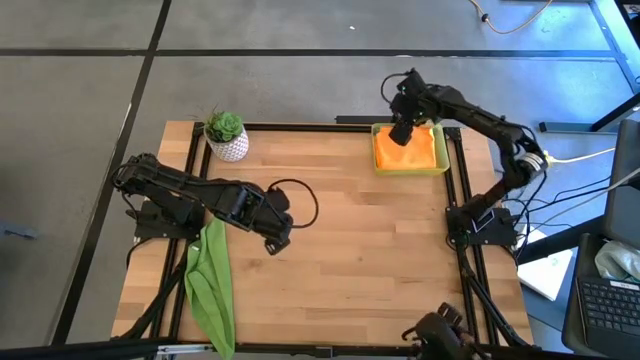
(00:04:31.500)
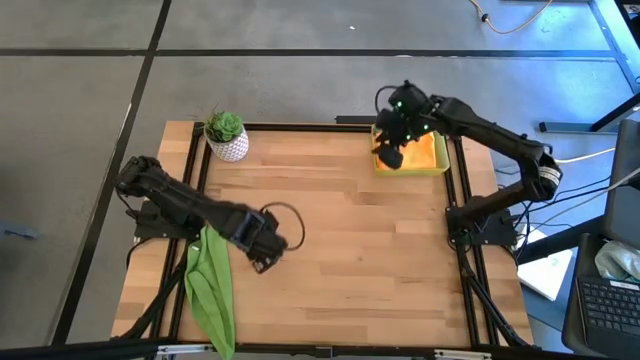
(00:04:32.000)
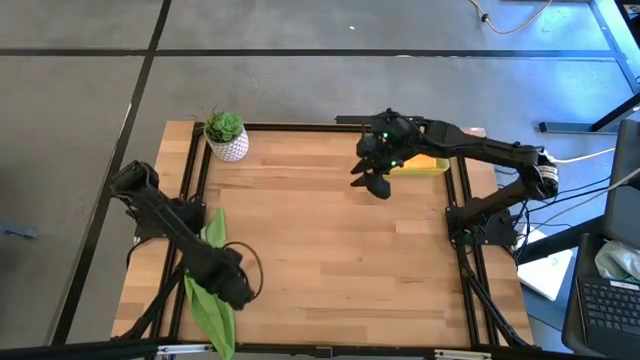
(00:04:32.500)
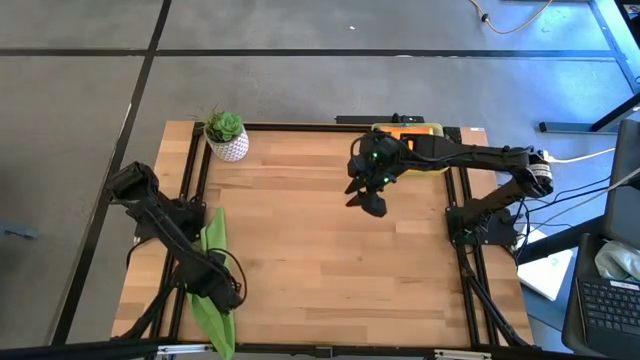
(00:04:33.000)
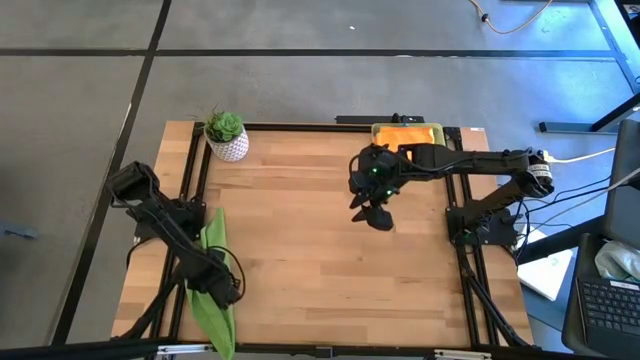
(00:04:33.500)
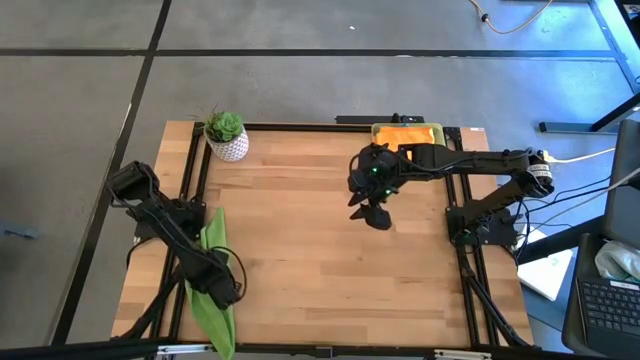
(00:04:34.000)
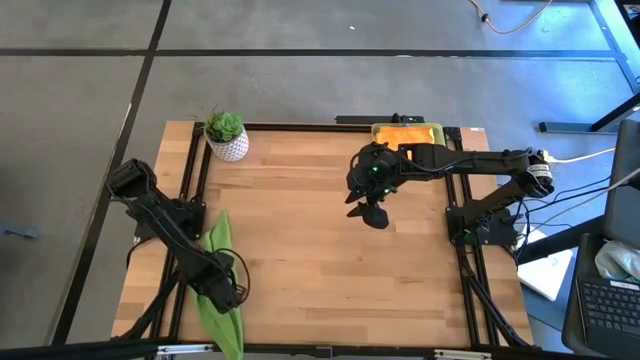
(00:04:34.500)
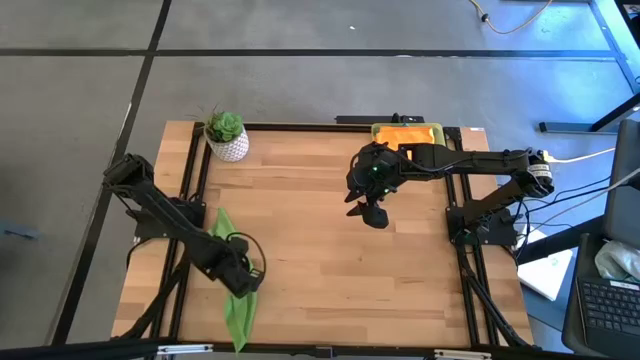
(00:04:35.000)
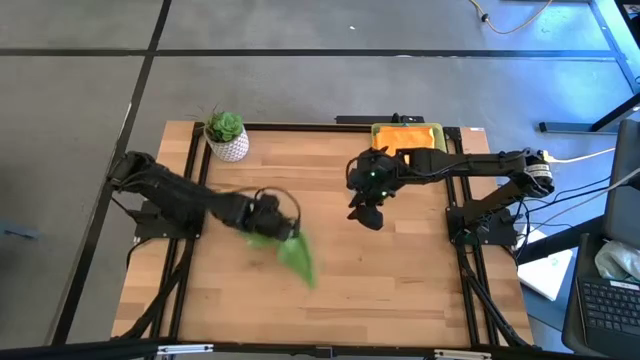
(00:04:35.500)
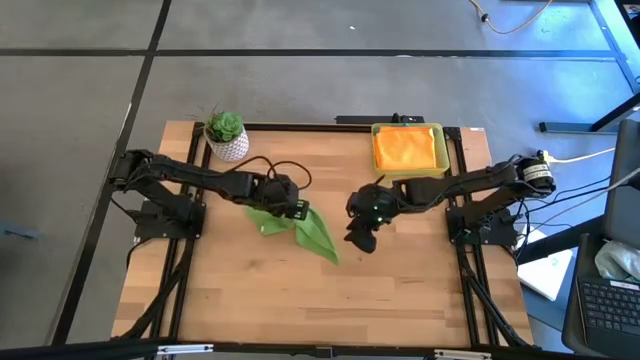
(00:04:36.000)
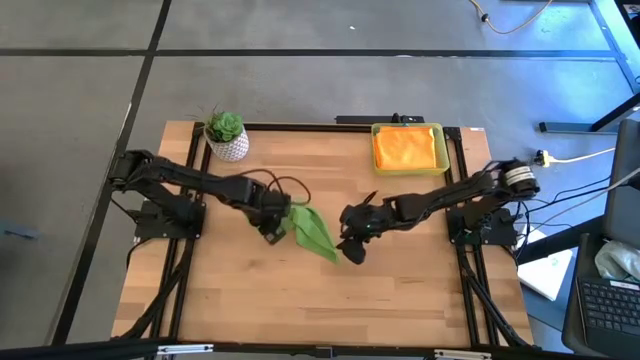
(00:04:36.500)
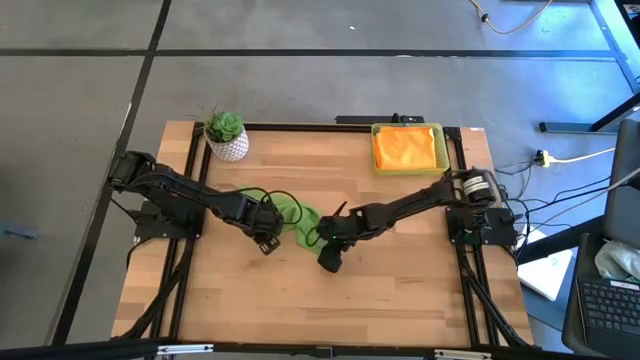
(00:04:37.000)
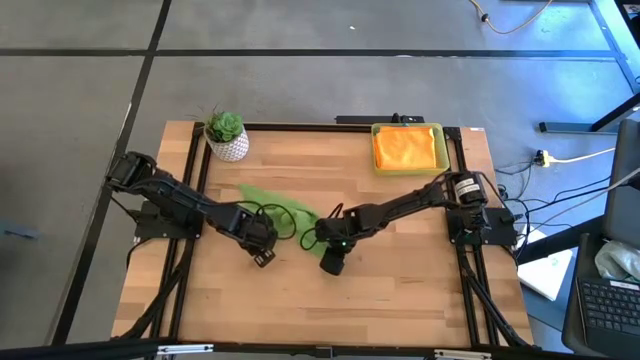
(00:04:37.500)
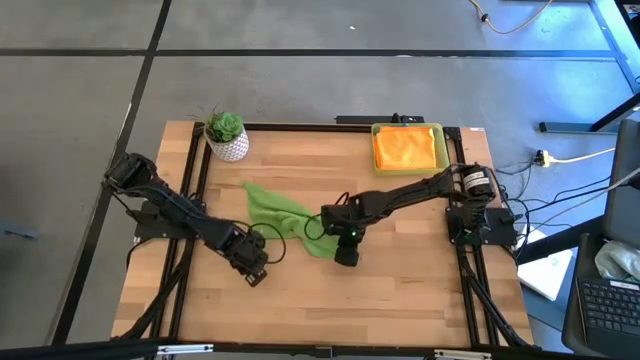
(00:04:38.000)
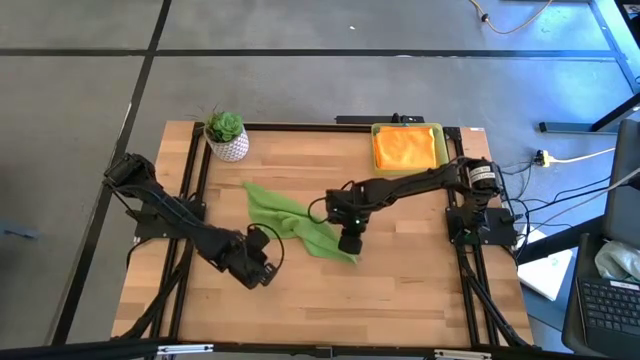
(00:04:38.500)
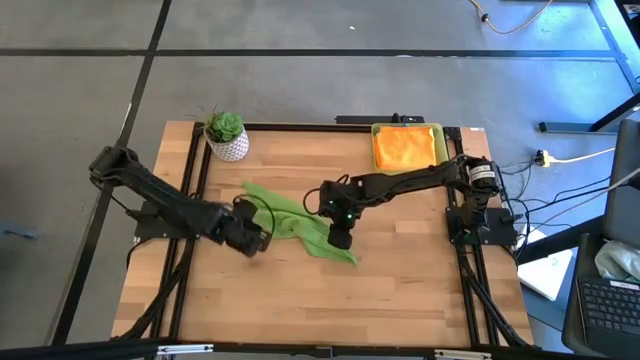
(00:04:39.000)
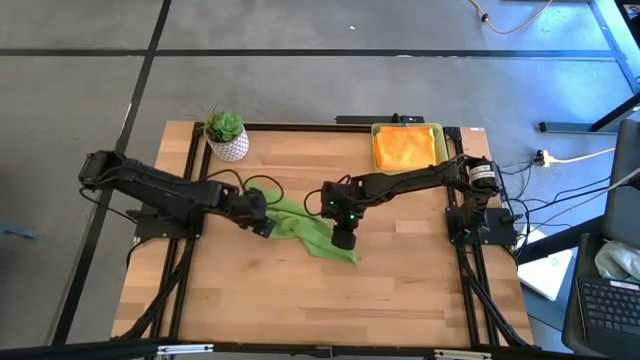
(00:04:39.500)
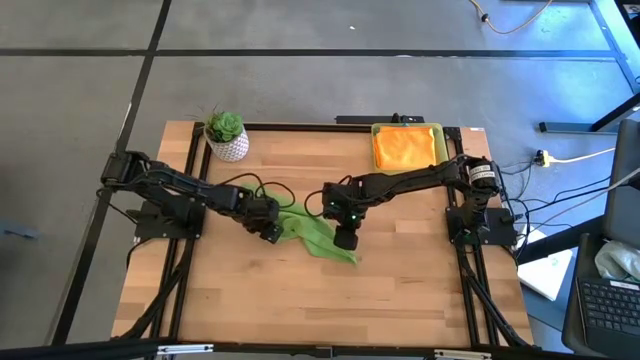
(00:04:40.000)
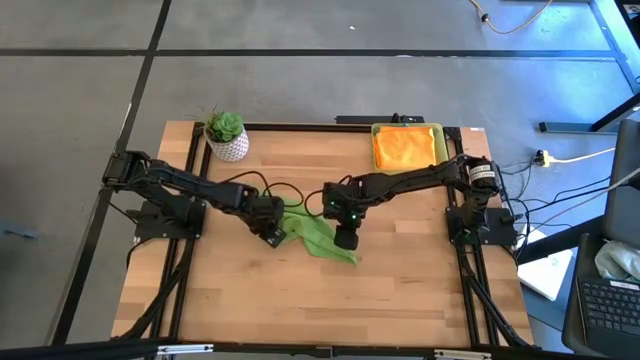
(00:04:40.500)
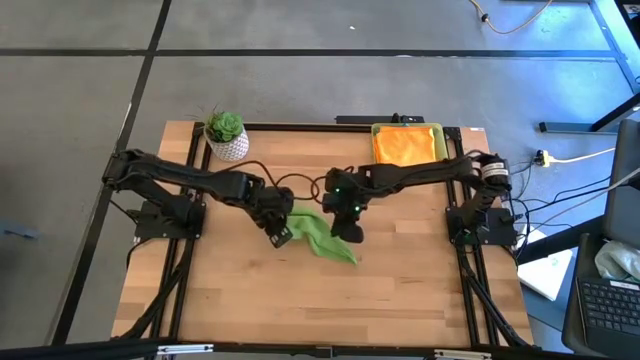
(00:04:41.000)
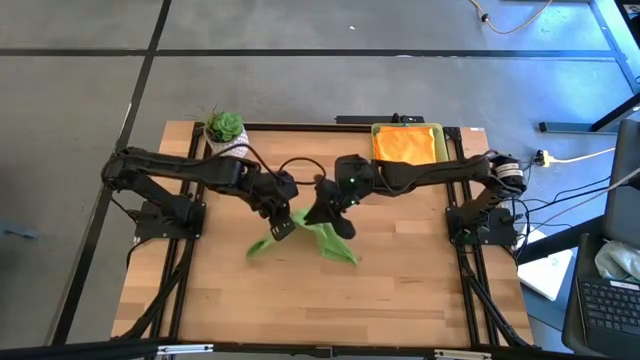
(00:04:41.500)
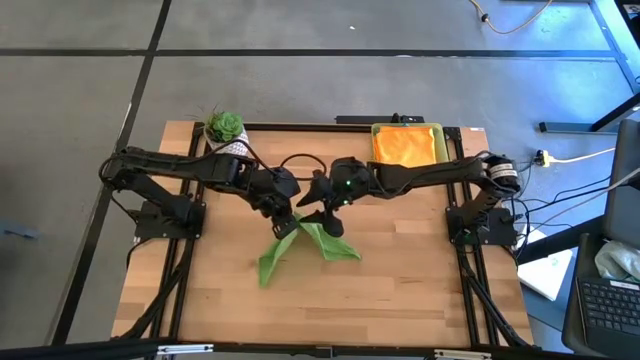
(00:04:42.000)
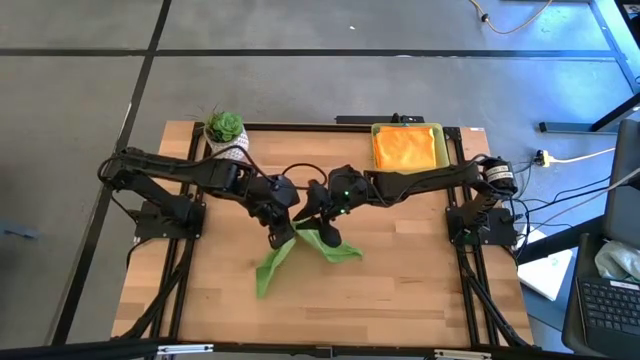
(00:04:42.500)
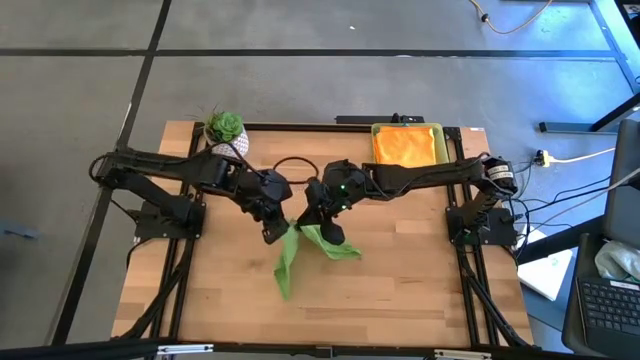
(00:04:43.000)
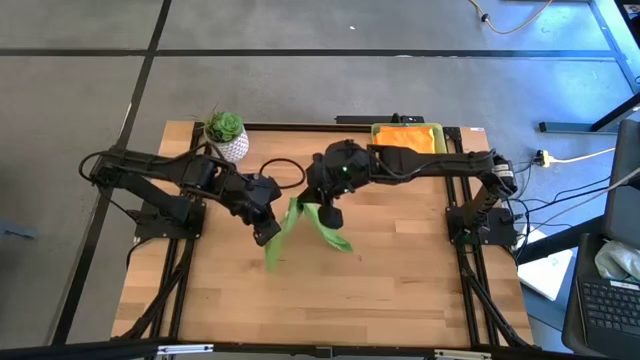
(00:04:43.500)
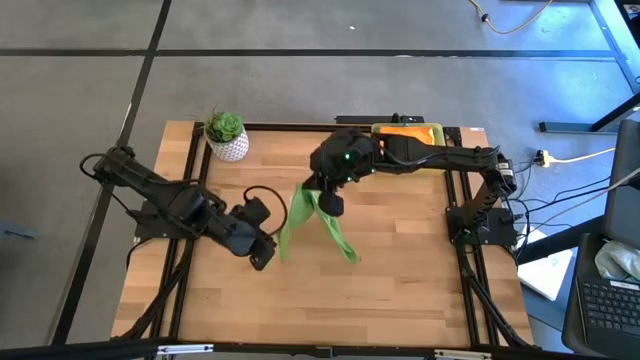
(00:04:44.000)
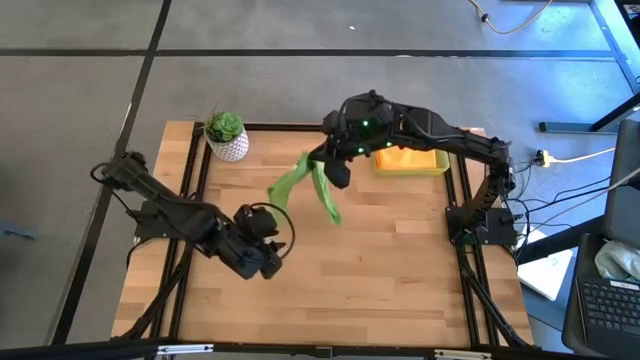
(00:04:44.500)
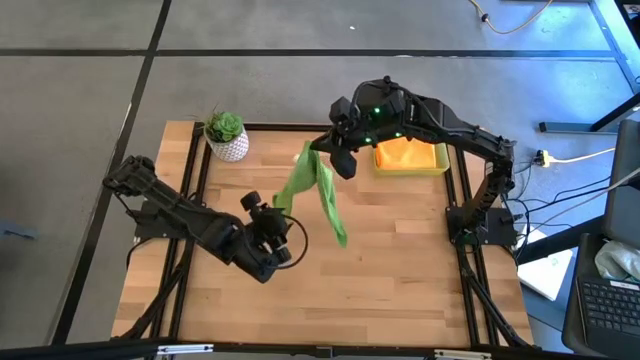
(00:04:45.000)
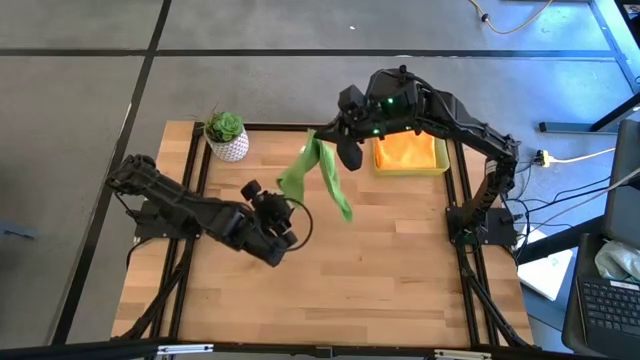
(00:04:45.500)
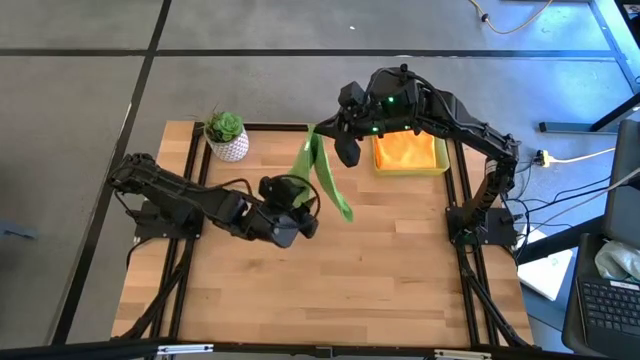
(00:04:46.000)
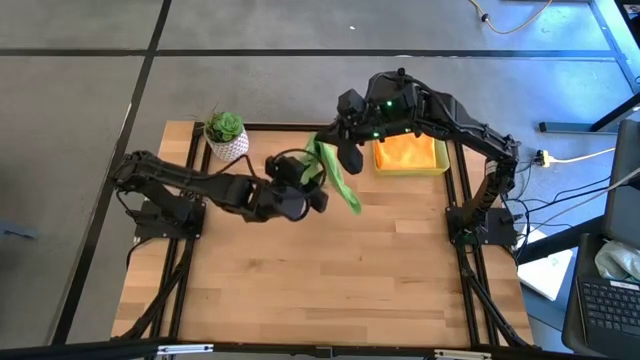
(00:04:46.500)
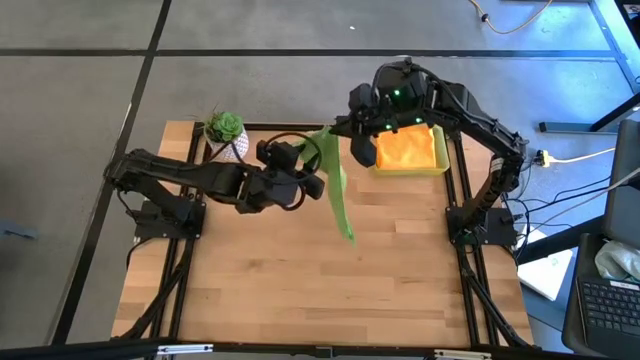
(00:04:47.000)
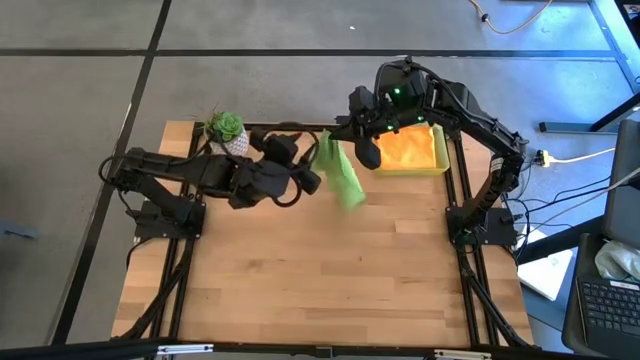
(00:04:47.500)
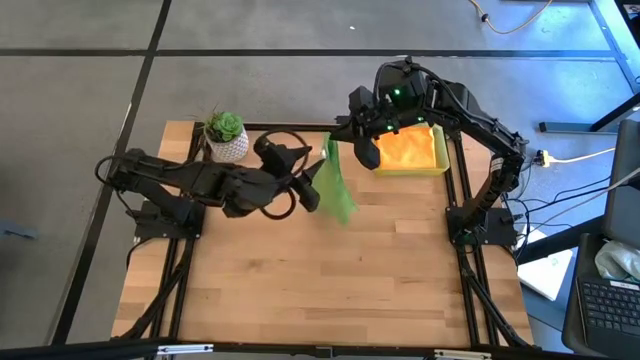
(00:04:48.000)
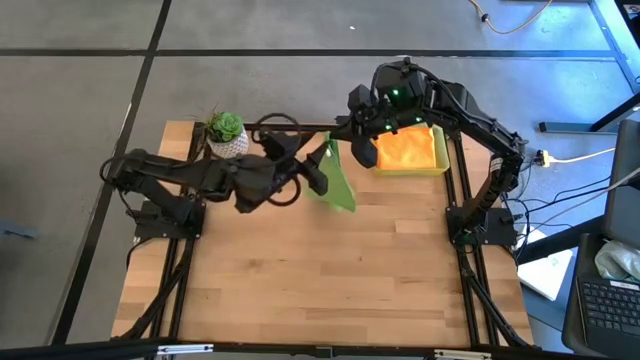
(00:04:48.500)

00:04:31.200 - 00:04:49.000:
Task: Fold microfiber towels
Fold the green microfiber towel

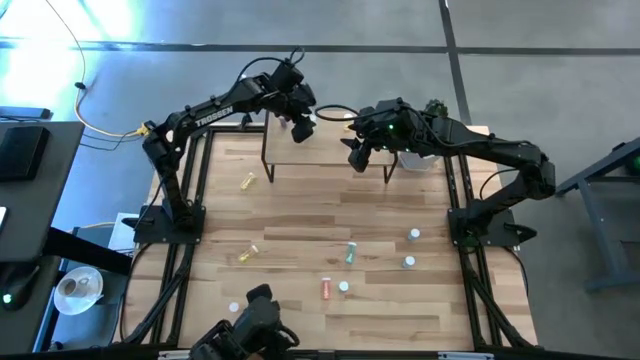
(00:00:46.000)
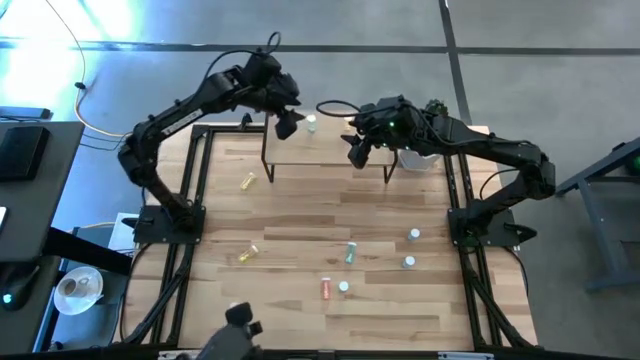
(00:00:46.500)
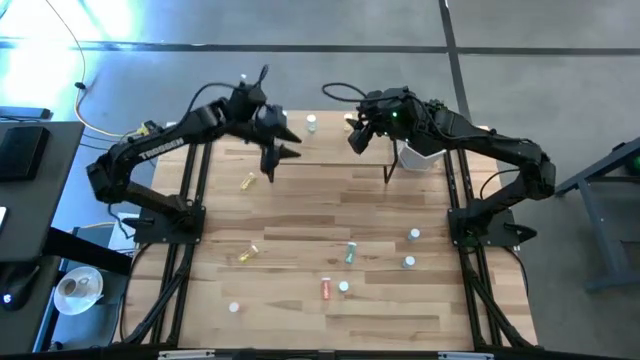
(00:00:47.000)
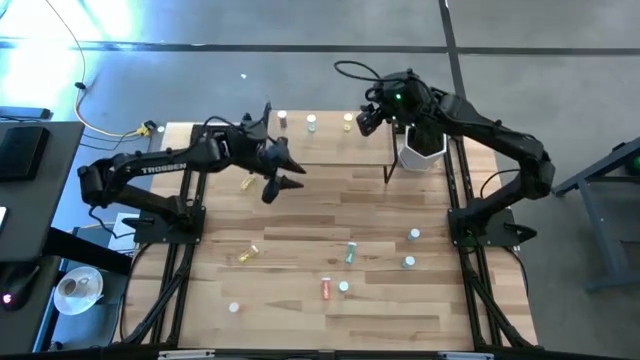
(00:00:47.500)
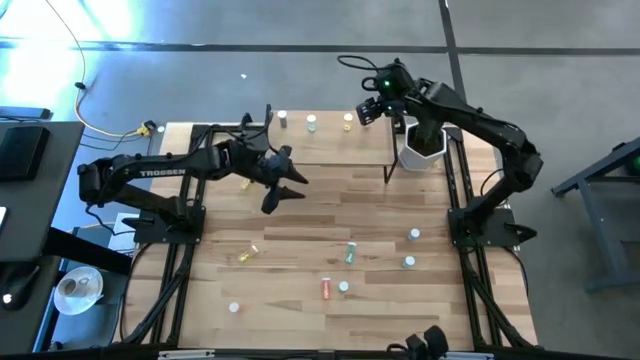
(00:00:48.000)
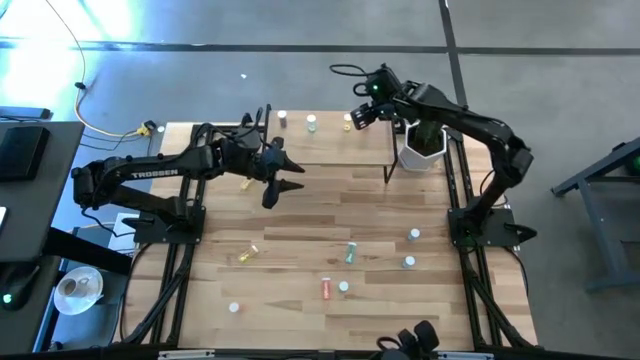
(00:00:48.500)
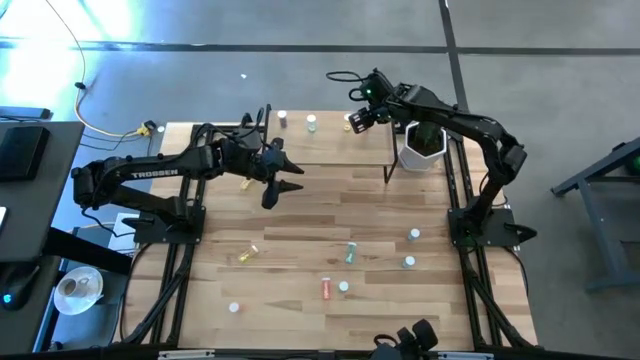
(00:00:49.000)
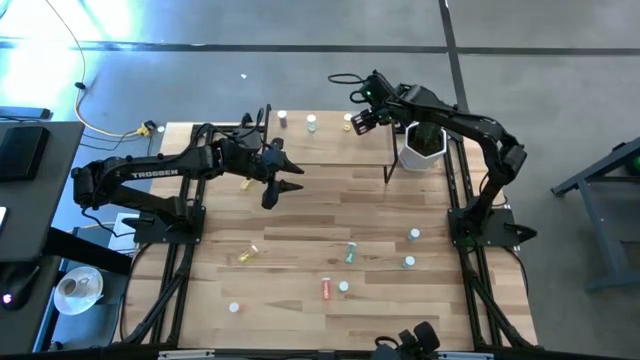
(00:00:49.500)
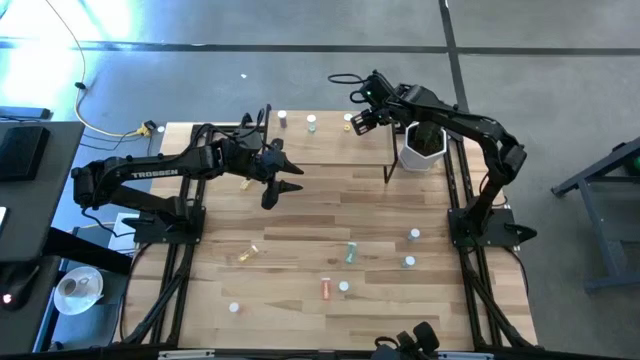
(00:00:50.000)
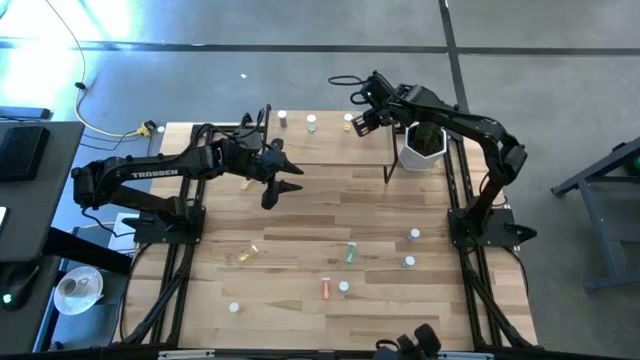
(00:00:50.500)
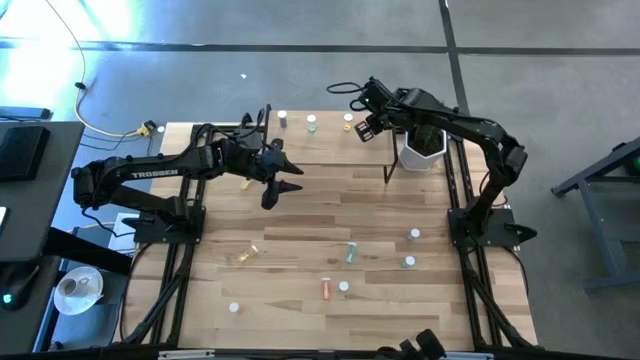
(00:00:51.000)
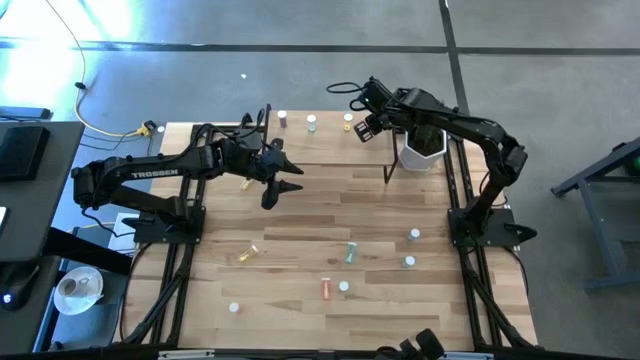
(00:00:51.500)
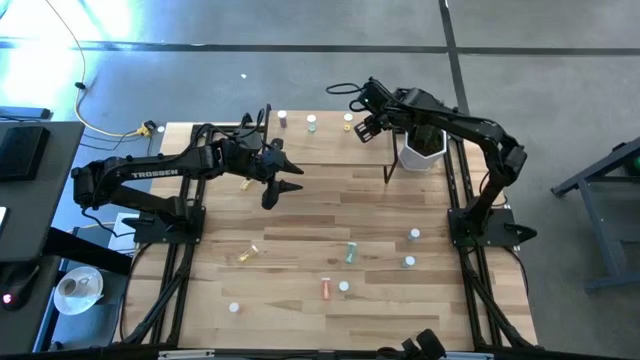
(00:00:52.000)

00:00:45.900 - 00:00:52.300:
Task: Pick and place medicine bottles onto shelf by color
Adjust the pink pill bottle on the shelf
